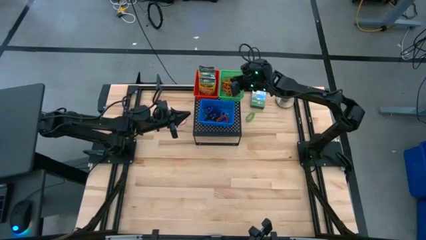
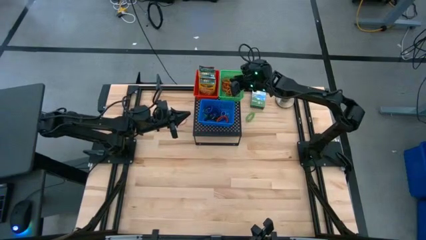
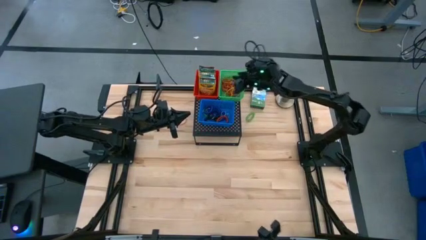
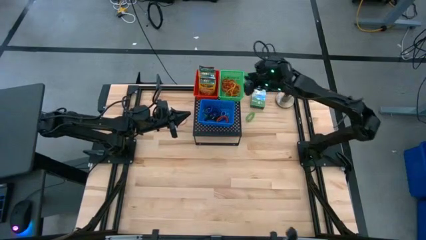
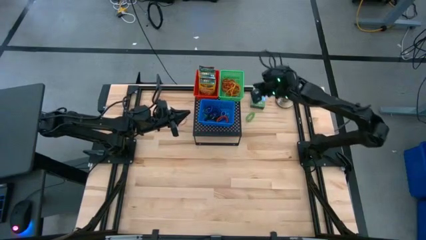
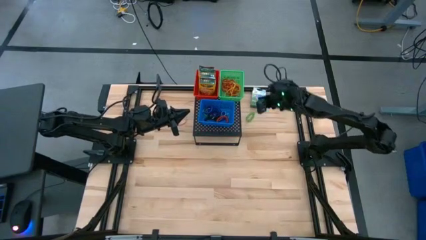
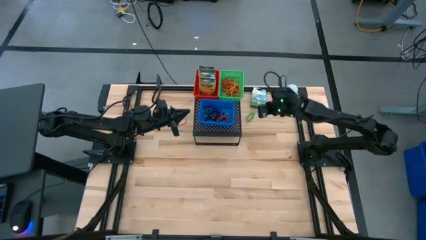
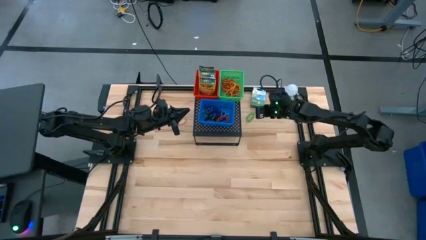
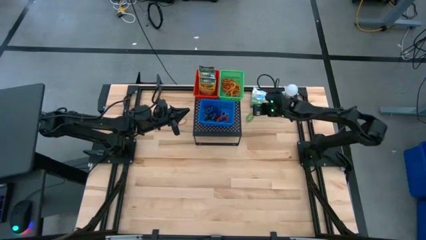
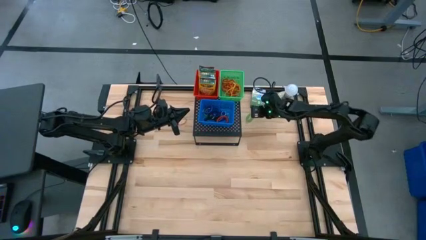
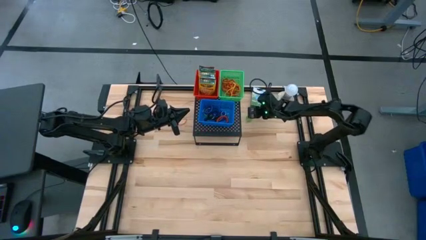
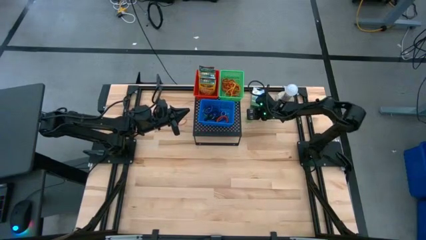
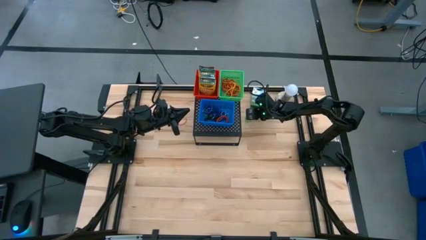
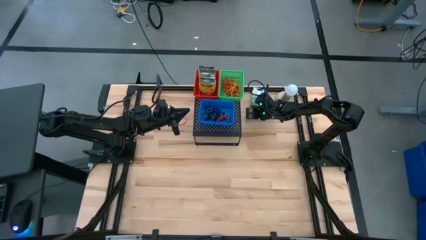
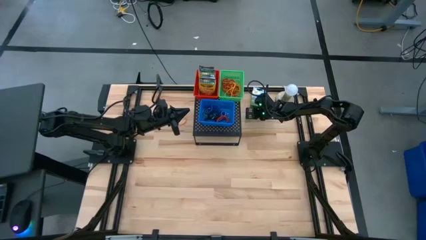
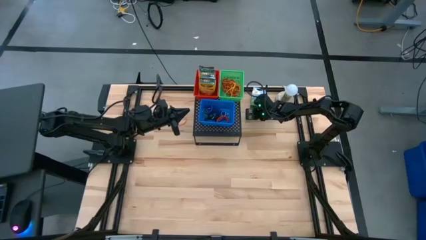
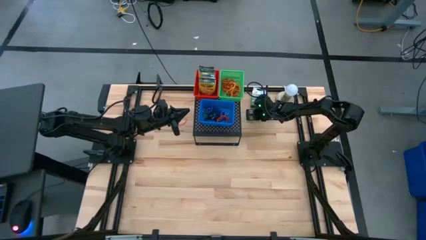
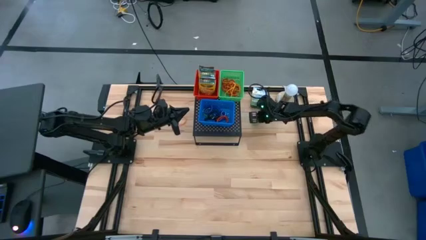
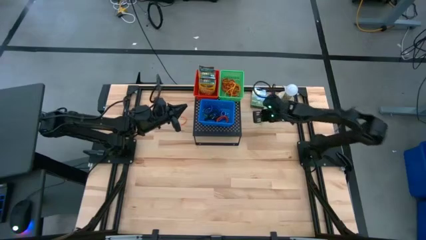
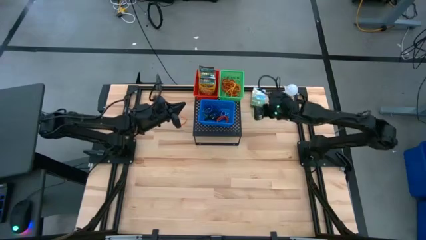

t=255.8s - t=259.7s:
Task: Pick & Place Office Desk Supplies
Put the green spring keychain into the green bin on the shelf

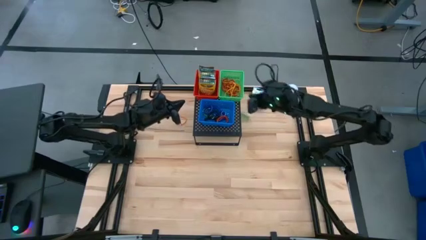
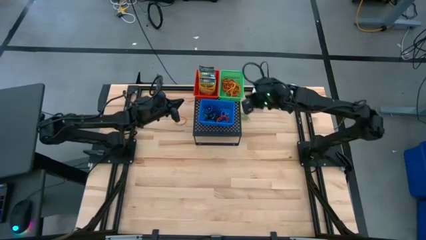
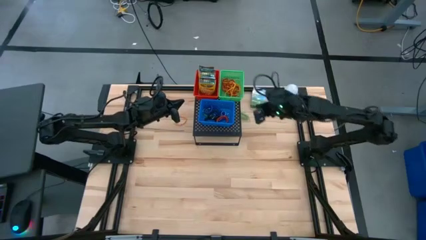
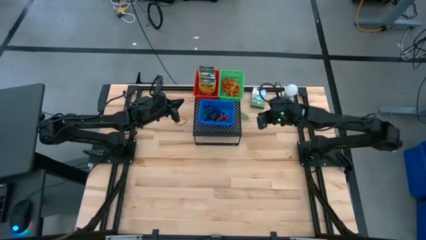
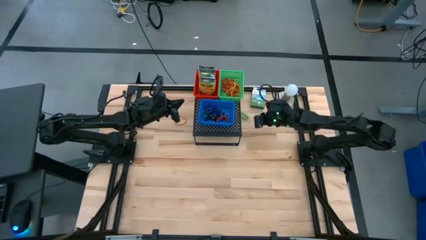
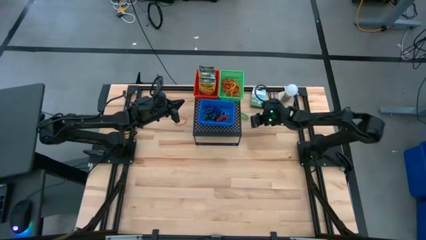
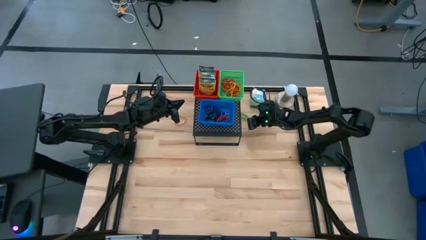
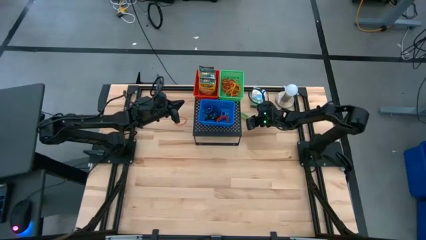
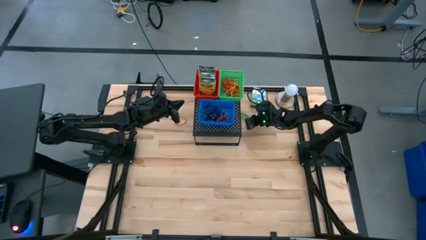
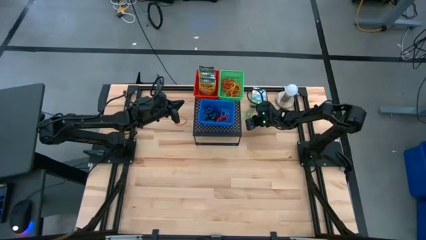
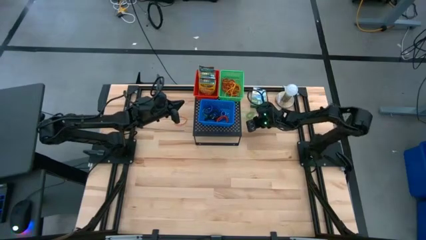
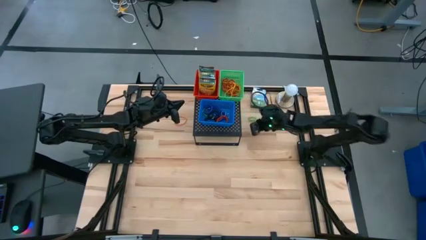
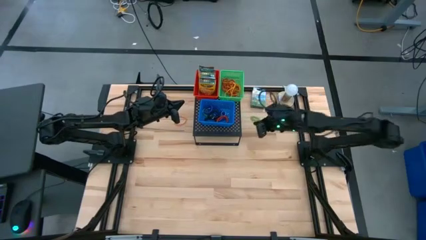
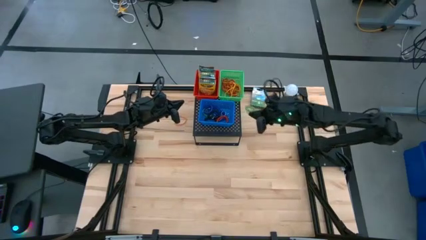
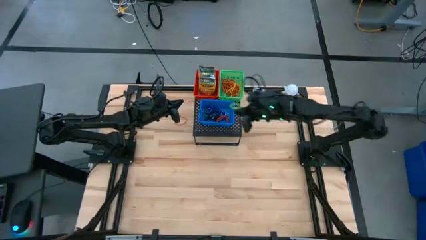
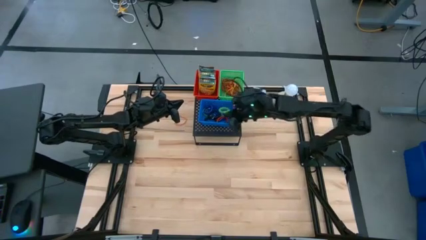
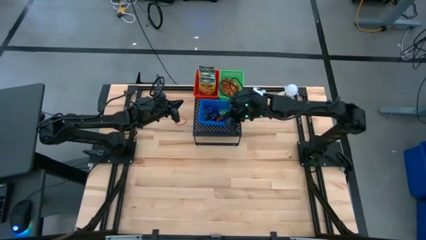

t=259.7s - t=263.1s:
Put the green spring keychain into the blue bin on the shelf

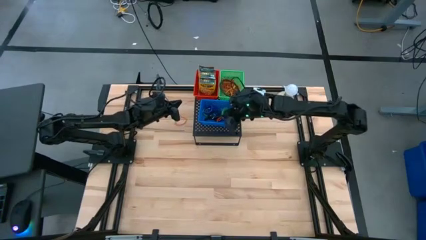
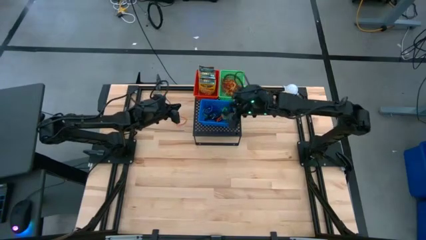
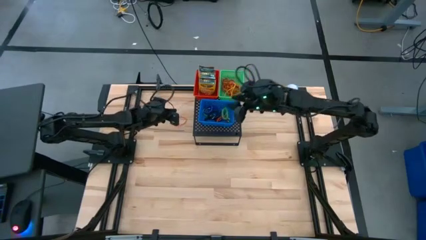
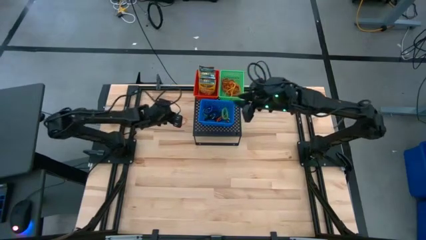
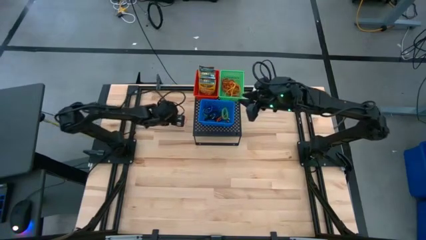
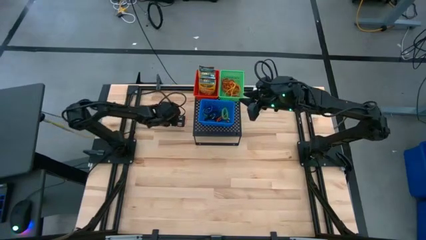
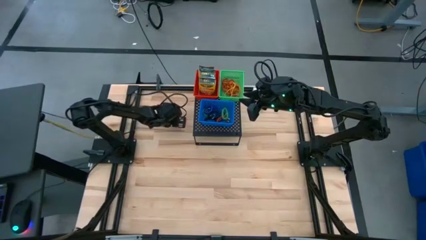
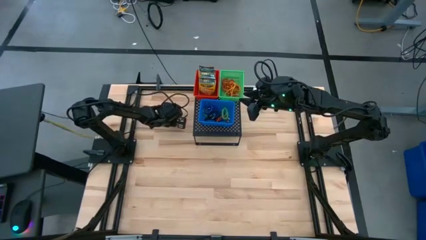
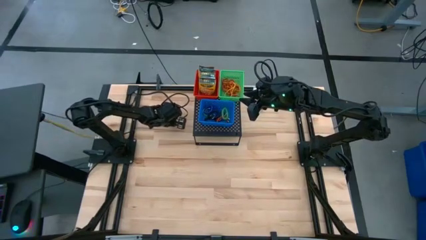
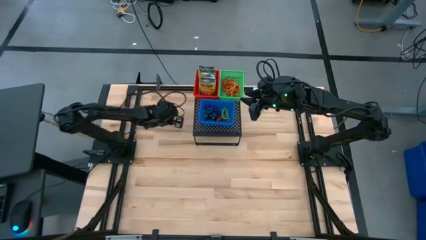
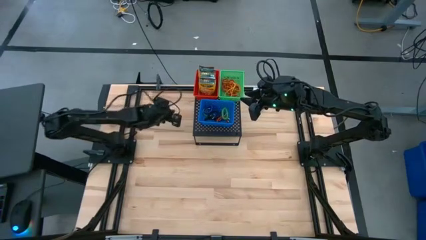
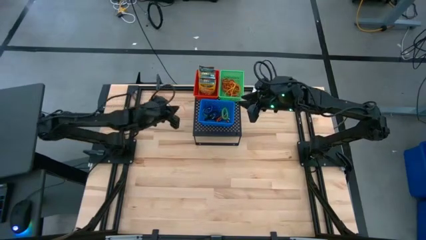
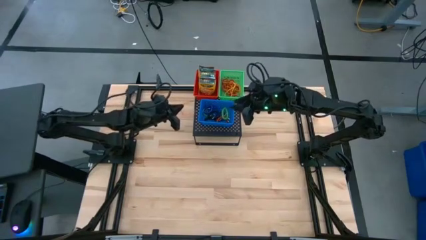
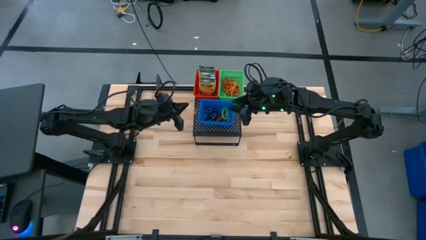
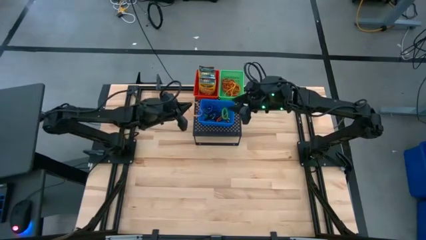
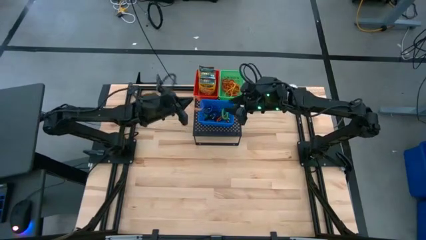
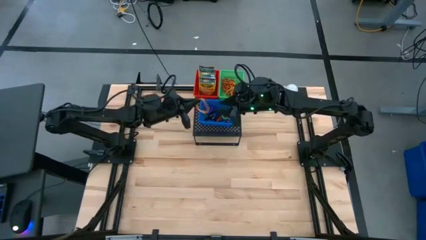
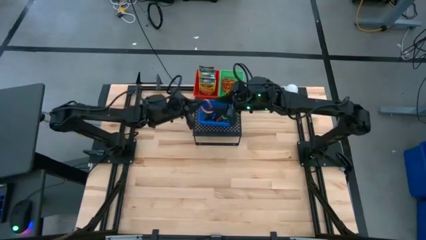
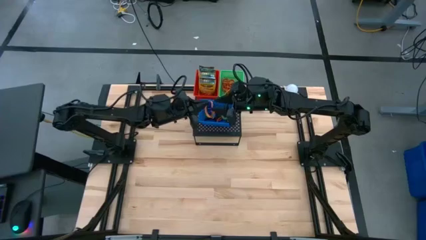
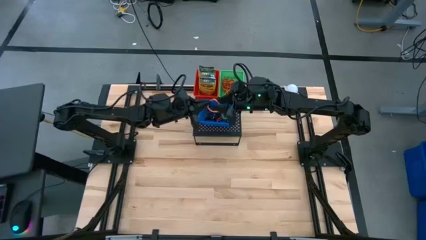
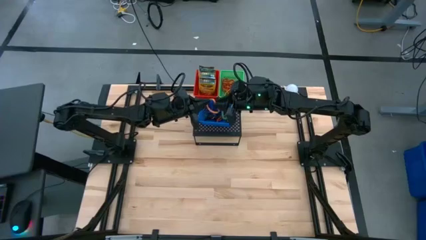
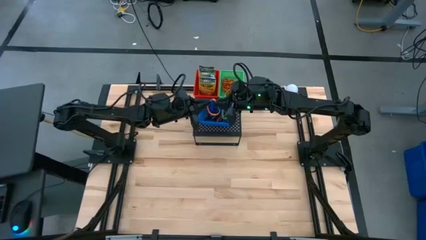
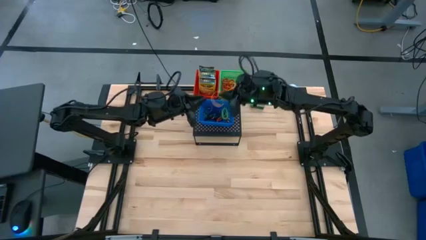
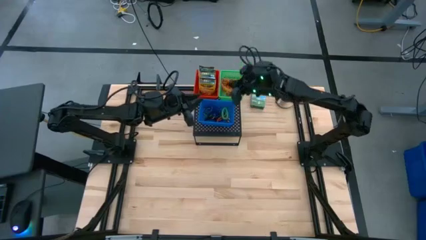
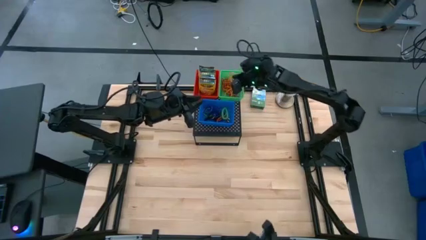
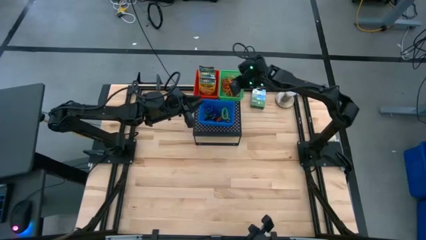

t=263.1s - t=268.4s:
Put the orange rubber band into the green bin on the shelf

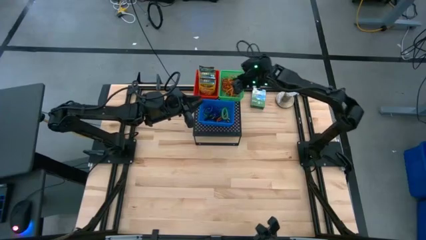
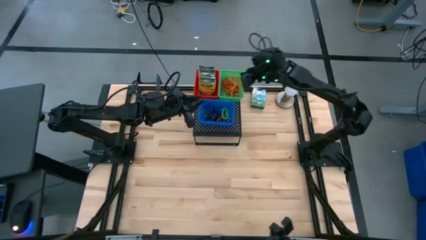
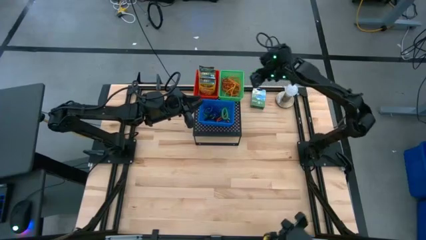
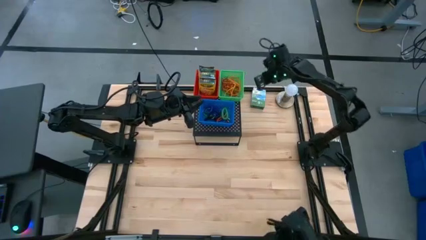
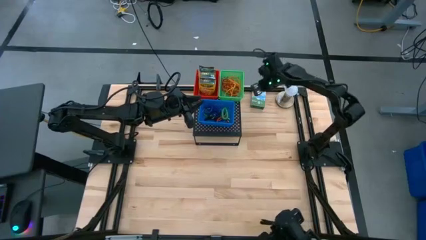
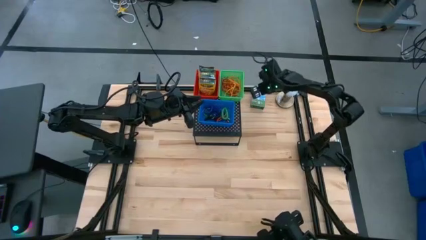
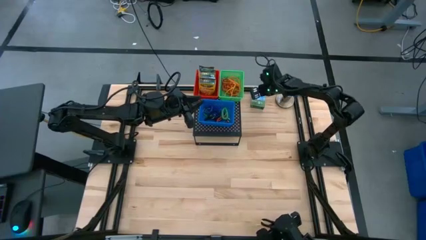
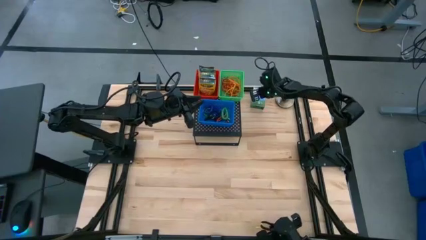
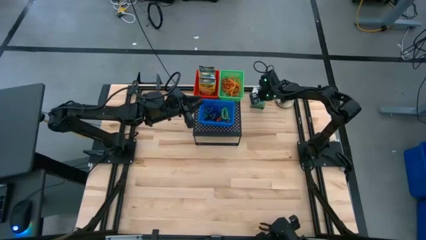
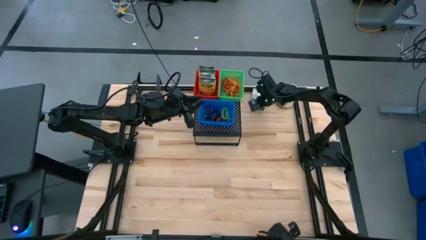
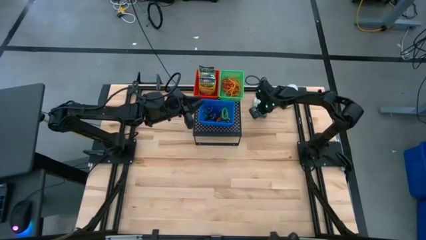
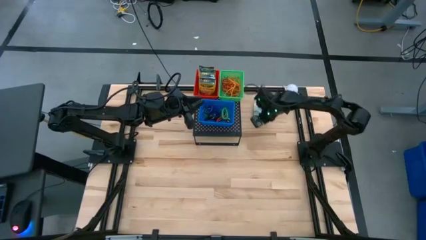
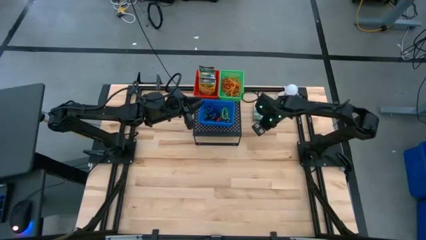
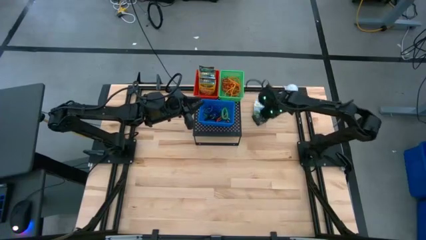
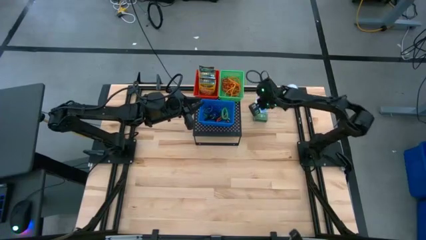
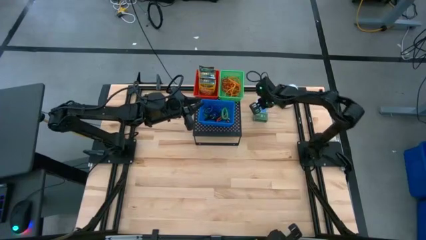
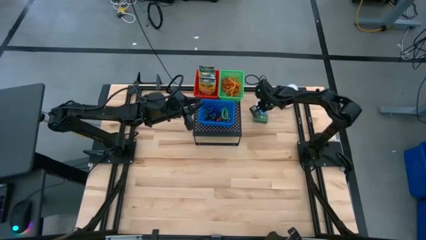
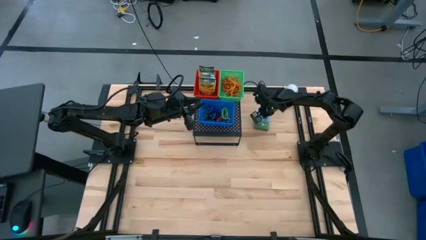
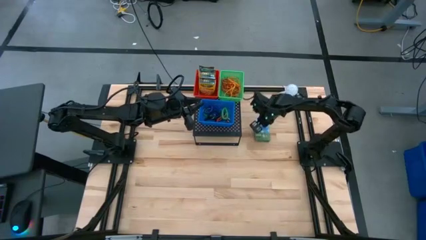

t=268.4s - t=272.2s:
Move the yellow crayon box

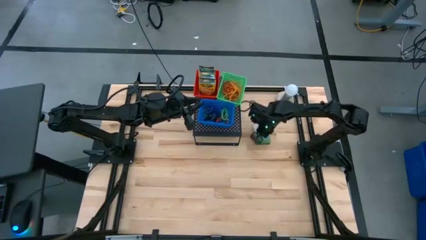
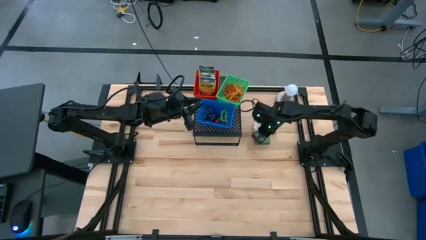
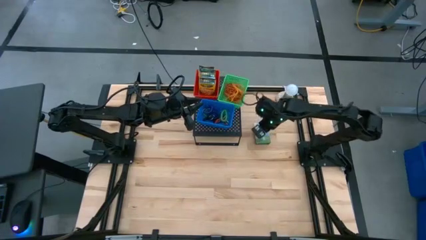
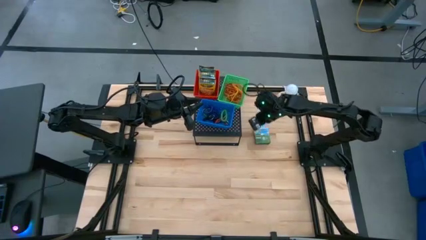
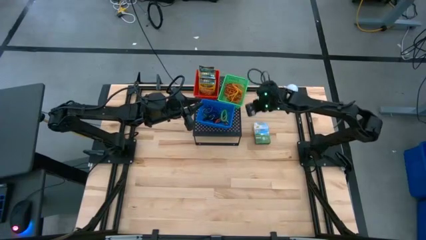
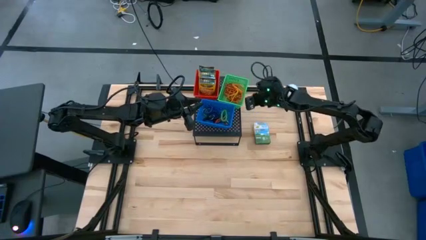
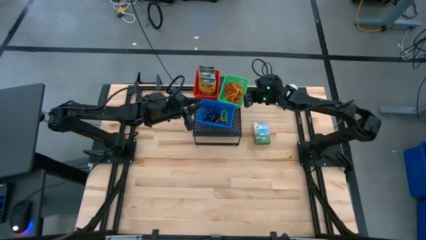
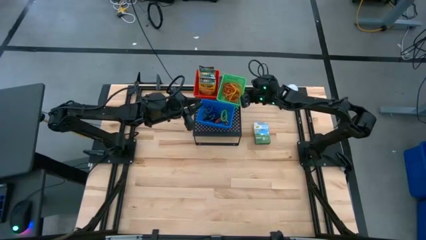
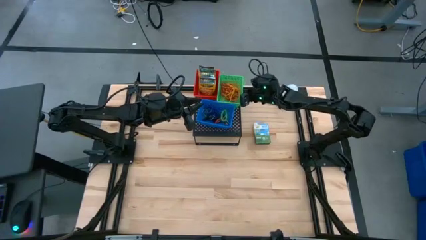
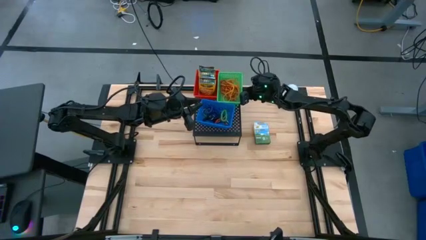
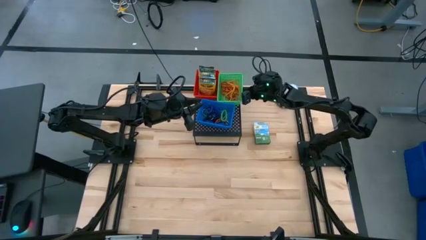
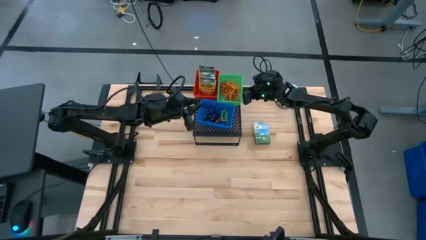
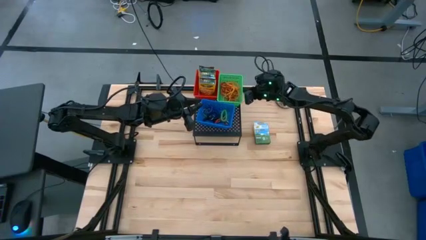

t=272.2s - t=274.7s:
Adjust the green bin
